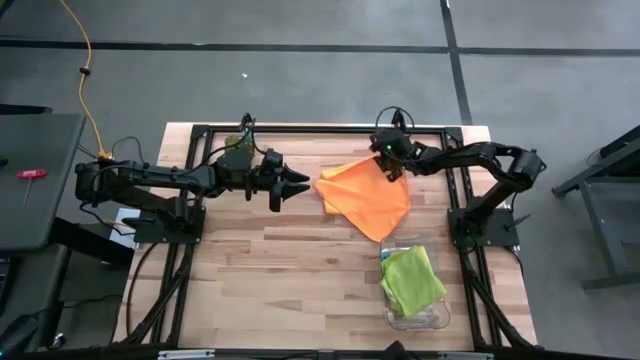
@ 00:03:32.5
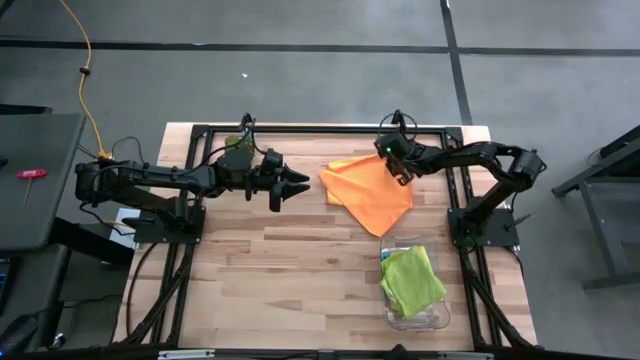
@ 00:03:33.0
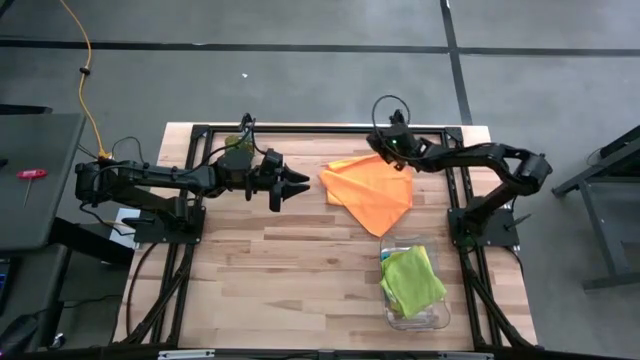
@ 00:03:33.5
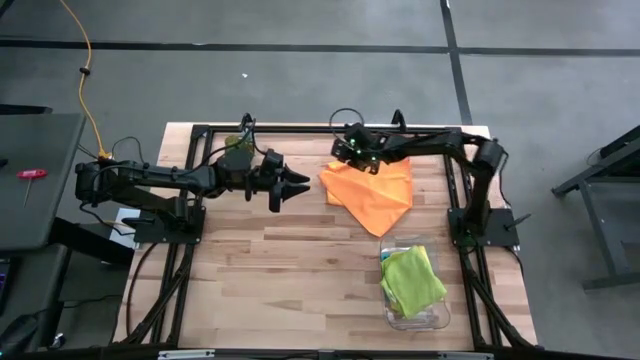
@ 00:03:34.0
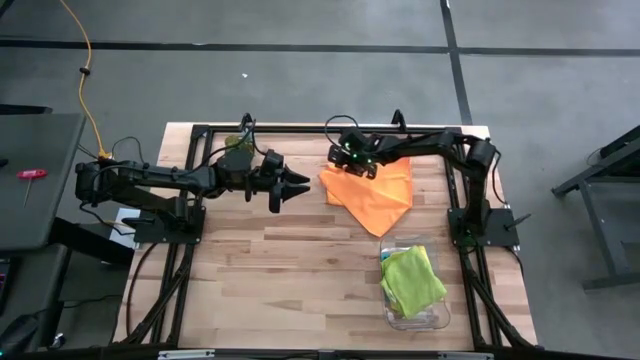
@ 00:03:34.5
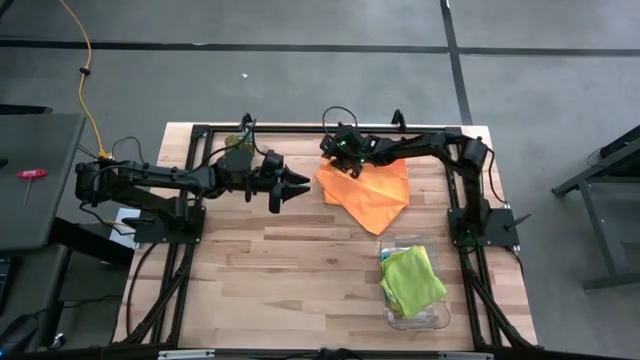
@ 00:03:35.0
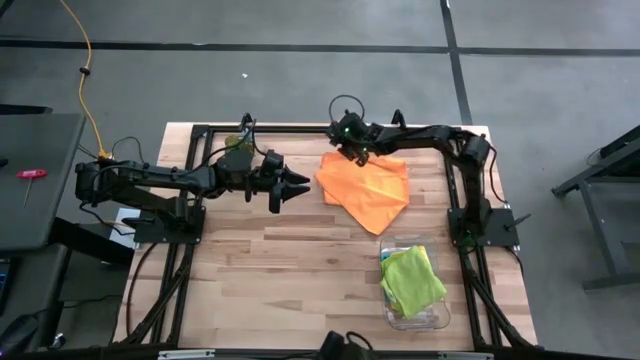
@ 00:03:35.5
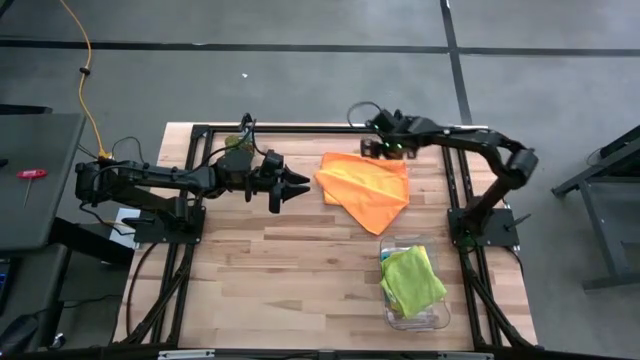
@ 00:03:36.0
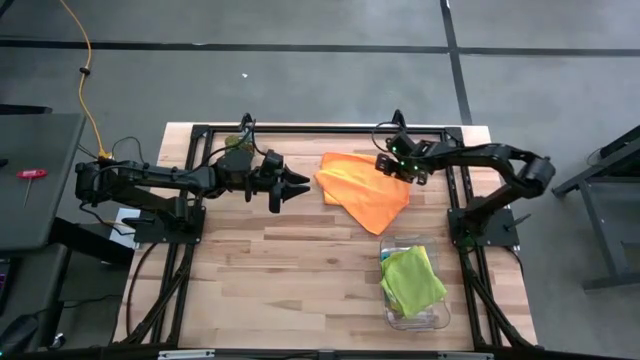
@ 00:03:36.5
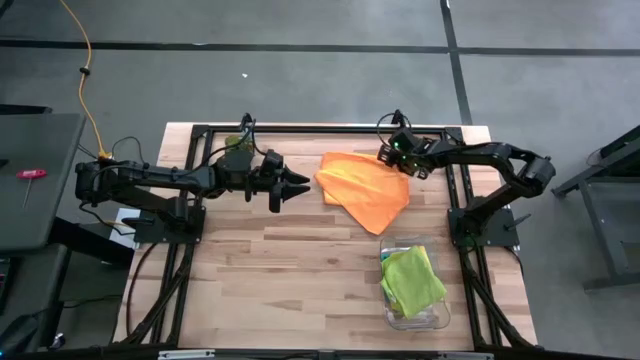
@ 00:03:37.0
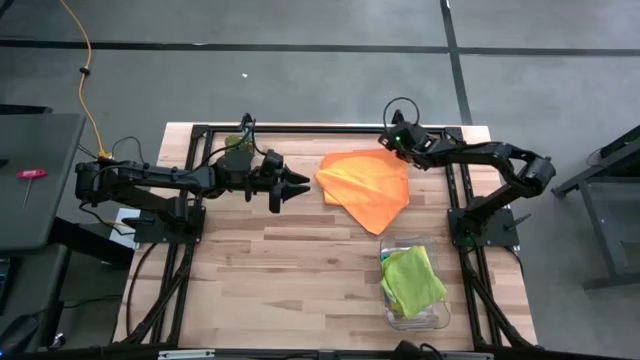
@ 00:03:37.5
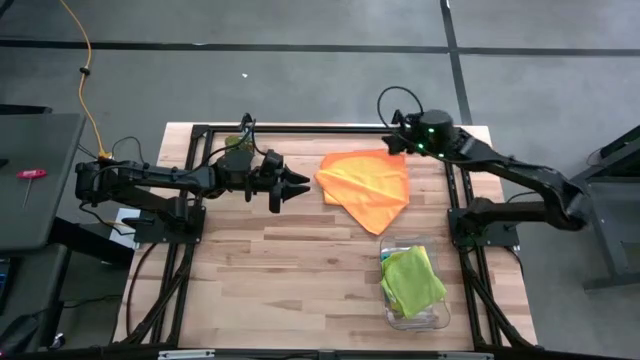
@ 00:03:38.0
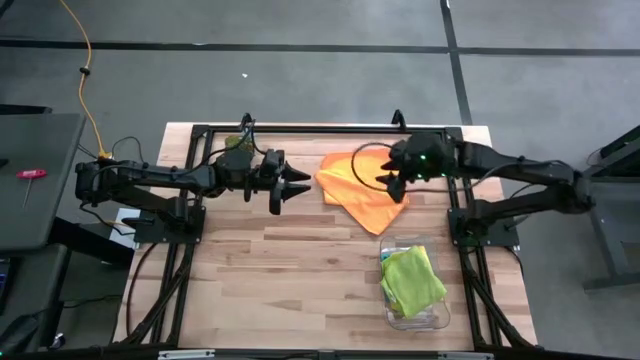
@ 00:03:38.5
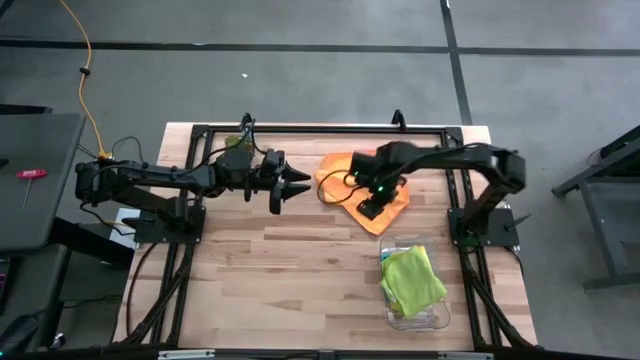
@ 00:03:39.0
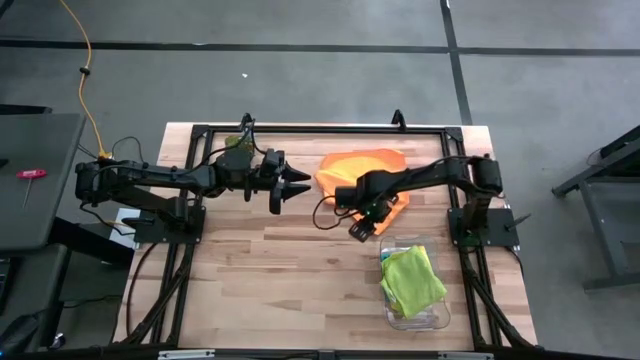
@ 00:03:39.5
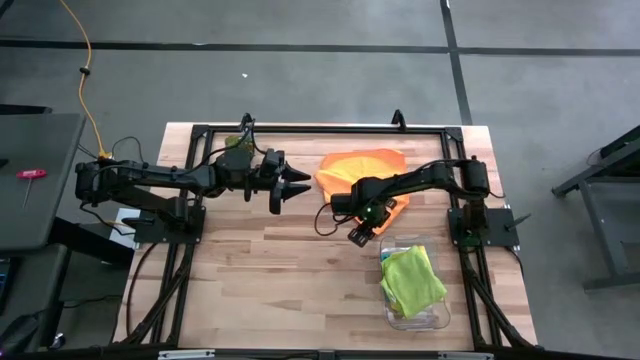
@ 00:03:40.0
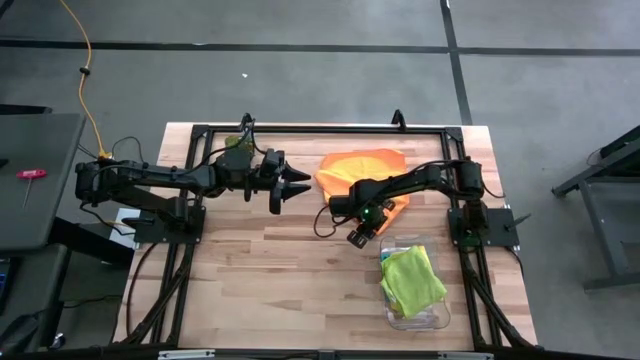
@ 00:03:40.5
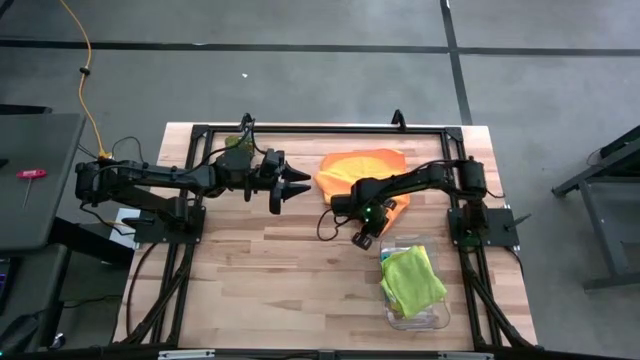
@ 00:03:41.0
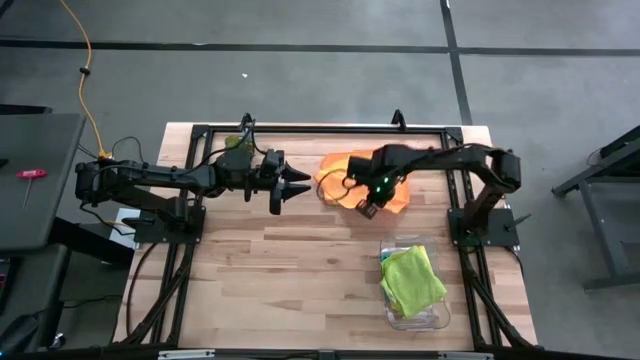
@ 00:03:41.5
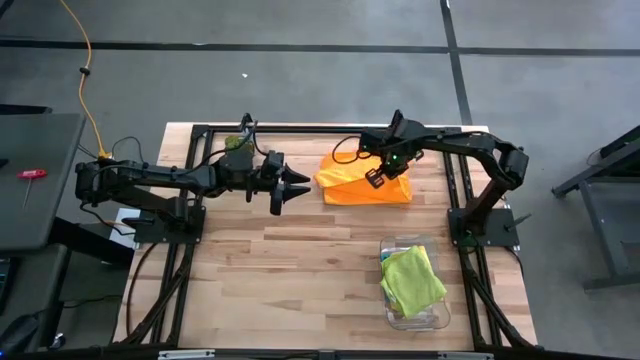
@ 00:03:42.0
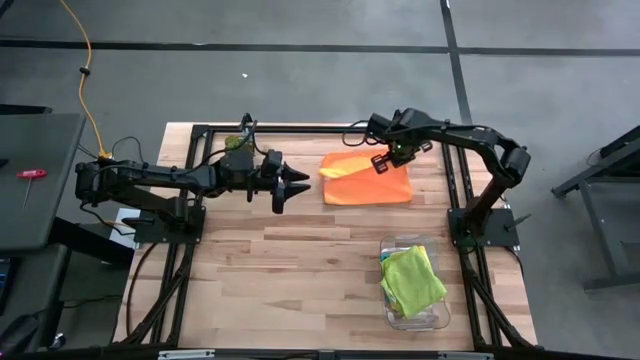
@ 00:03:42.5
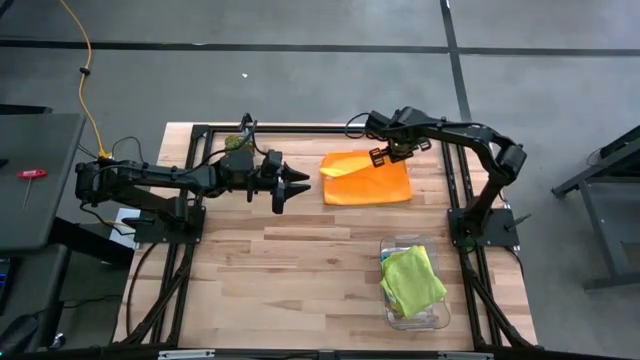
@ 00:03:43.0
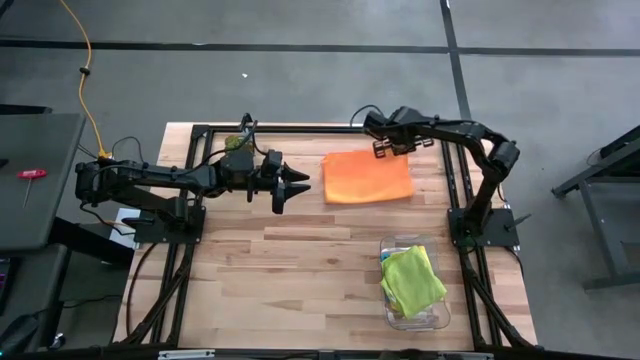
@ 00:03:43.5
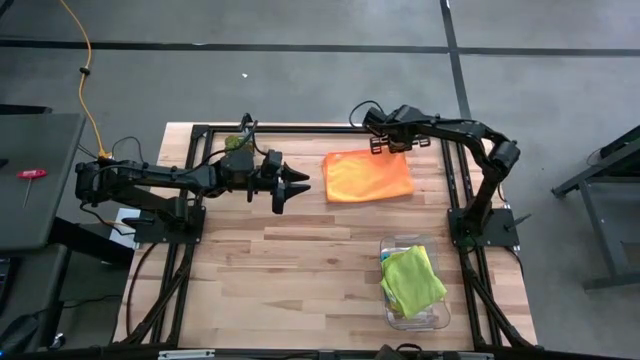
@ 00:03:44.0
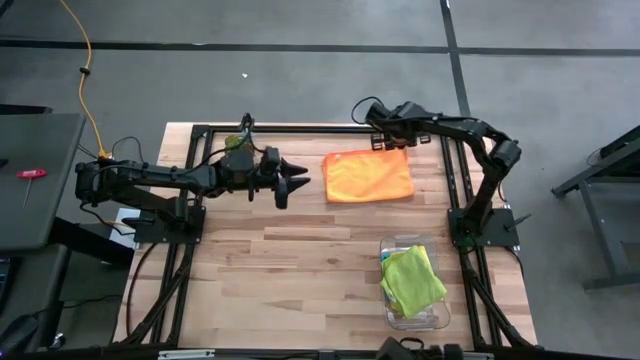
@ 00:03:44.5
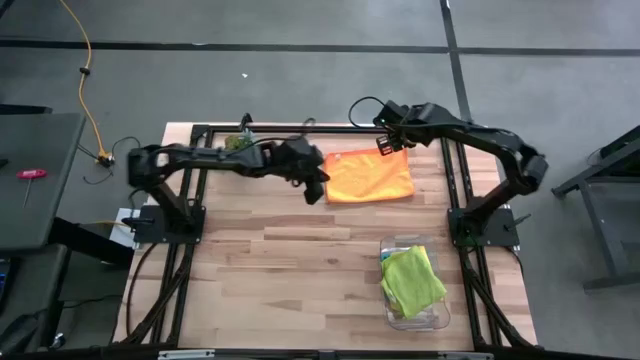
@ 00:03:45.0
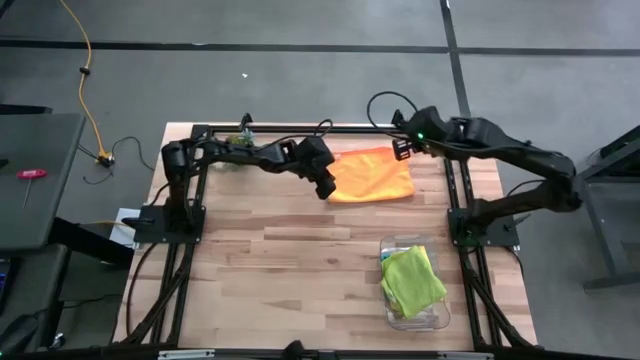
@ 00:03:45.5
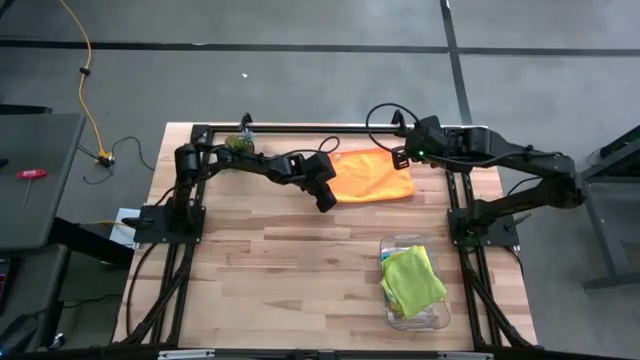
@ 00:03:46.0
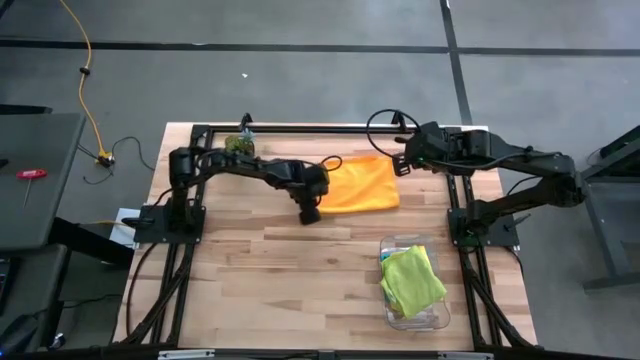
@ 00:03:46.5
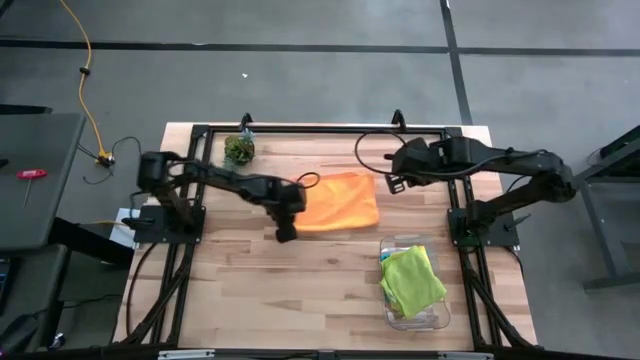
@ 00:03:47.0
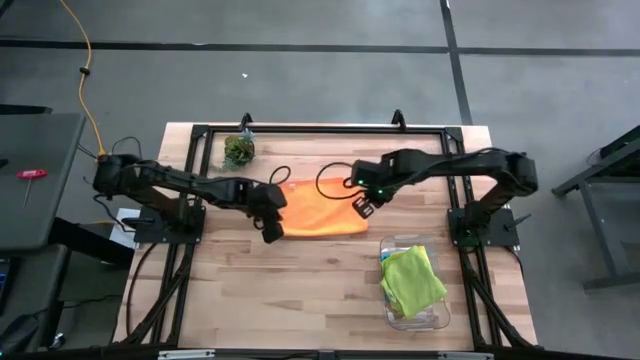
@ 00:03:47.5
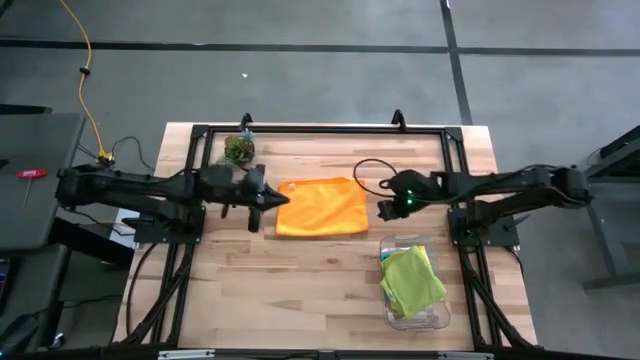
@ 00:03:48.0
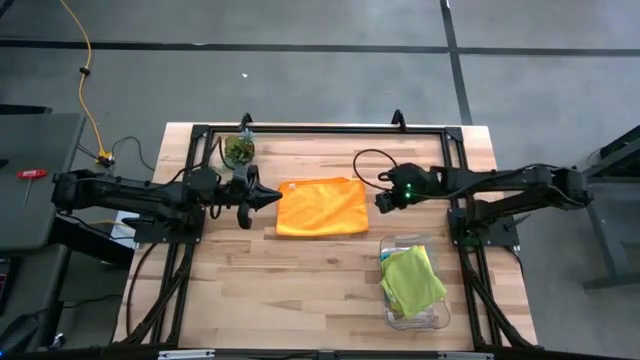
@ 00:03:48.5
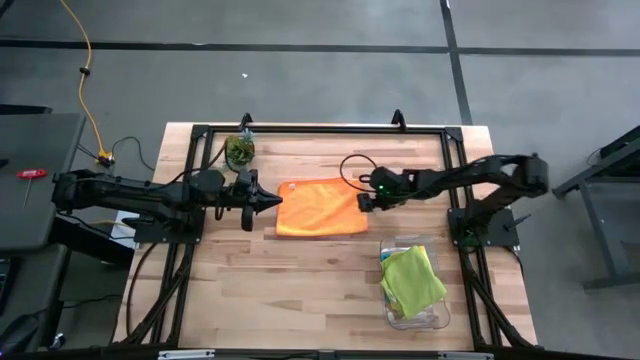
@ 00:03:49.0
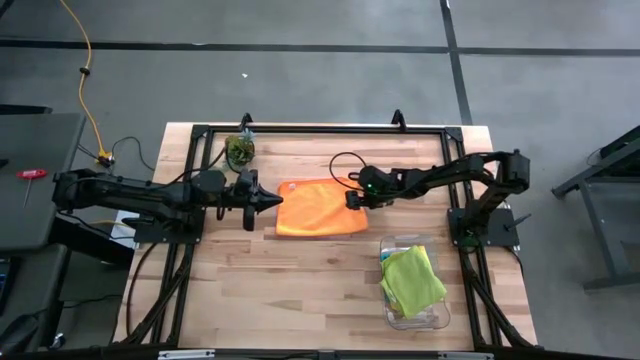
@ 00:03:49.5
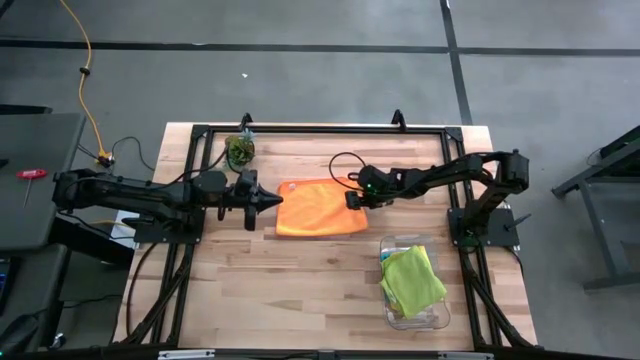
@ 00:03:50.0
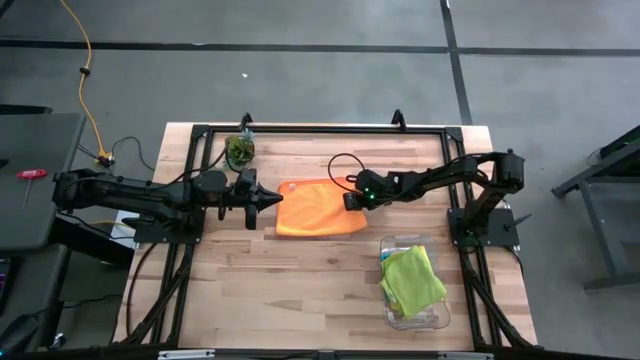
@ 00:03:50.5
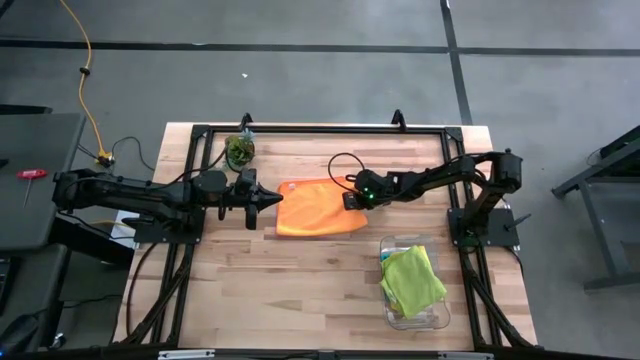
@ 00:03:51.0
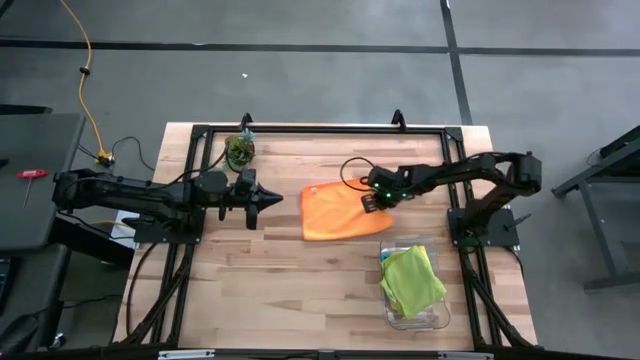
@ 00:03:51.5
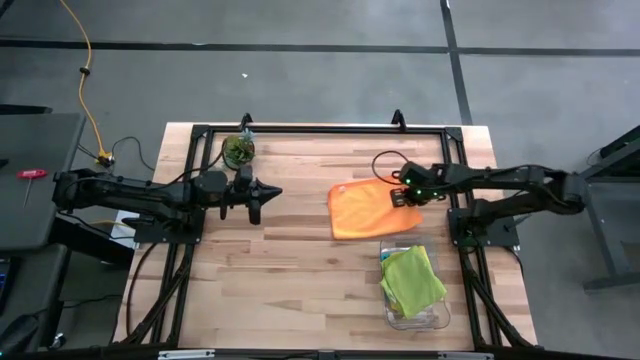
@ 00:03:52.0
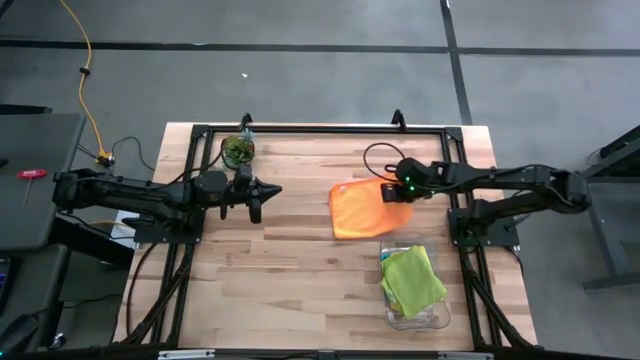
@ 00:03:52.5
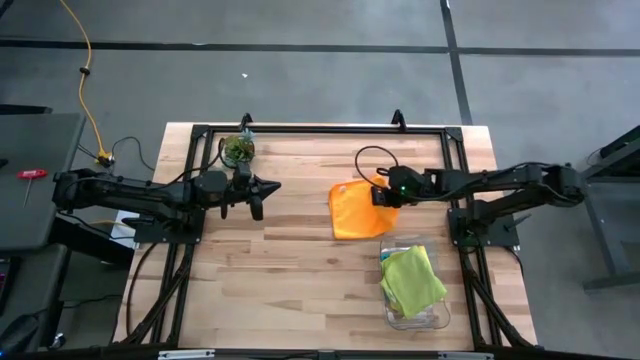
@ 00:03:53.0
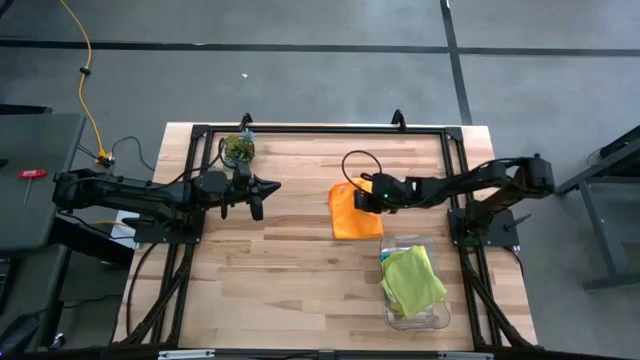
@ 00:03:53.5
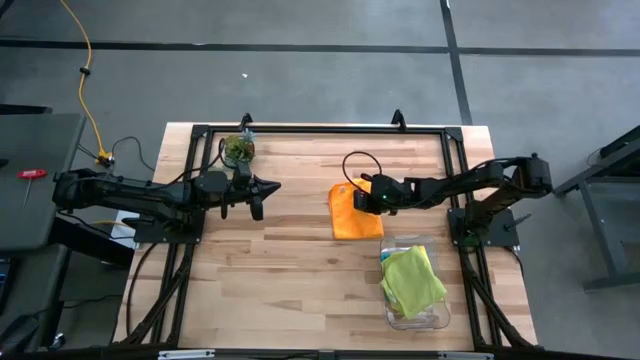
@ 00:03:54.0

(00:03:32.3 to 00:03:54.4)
Task: Fold microfiber towels
Fold the orange microfiber cloth
